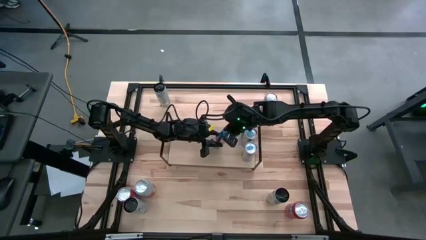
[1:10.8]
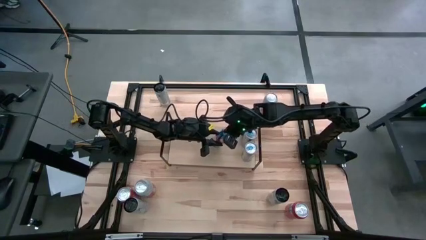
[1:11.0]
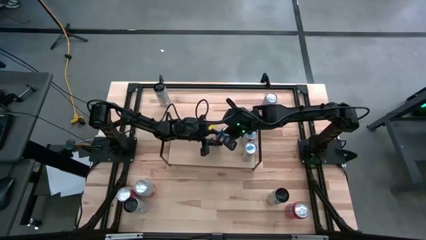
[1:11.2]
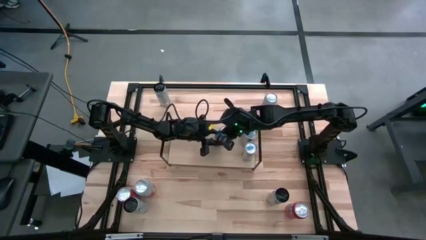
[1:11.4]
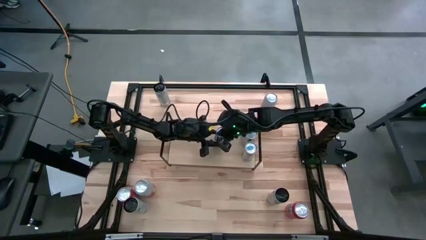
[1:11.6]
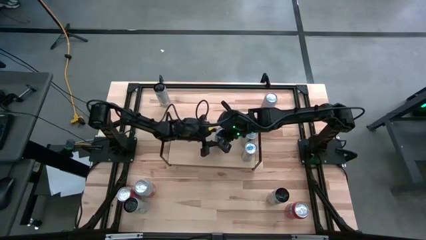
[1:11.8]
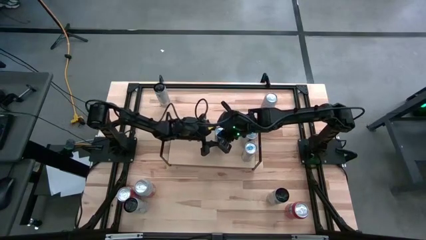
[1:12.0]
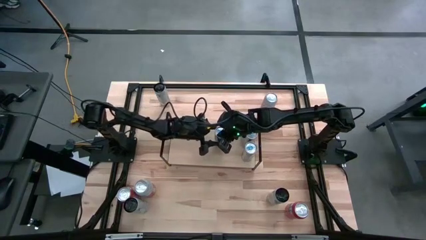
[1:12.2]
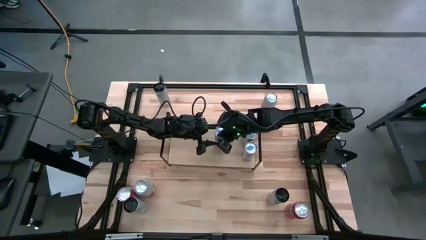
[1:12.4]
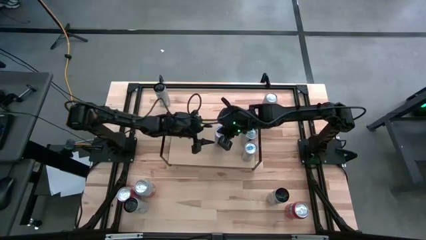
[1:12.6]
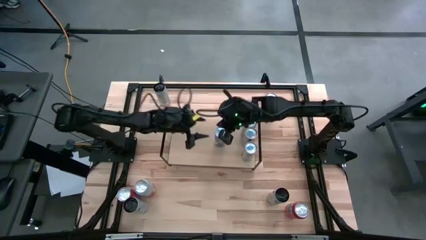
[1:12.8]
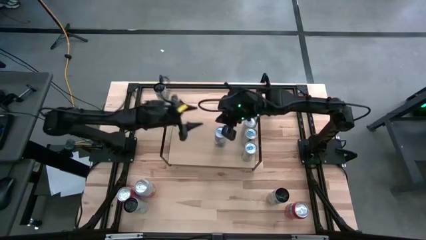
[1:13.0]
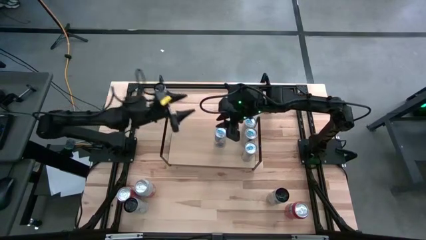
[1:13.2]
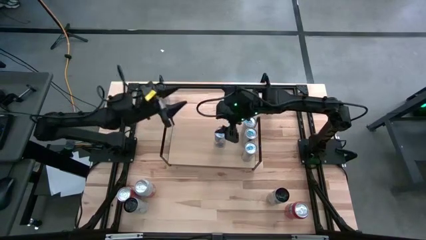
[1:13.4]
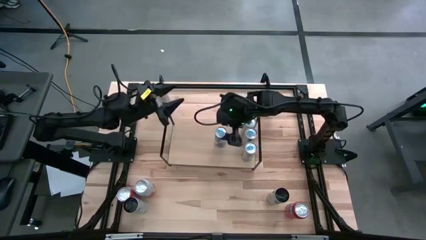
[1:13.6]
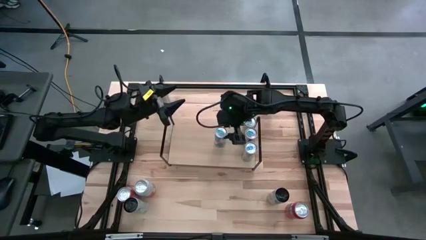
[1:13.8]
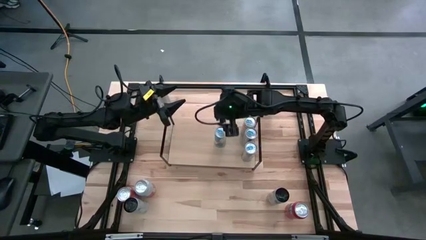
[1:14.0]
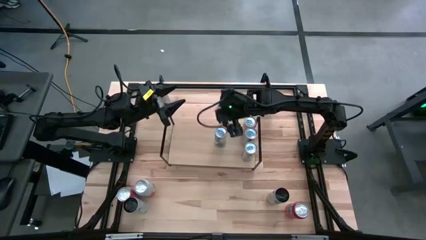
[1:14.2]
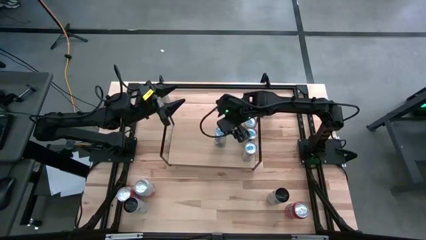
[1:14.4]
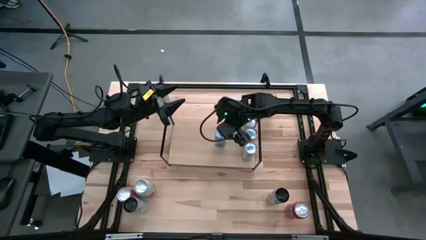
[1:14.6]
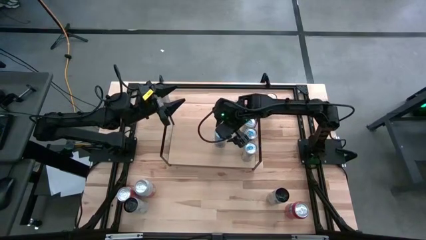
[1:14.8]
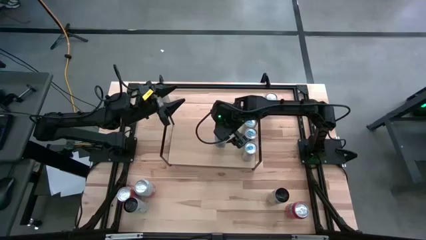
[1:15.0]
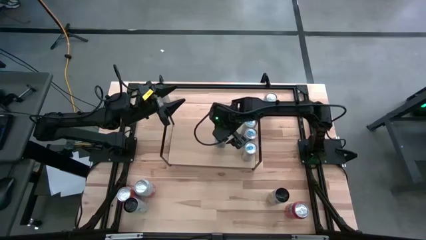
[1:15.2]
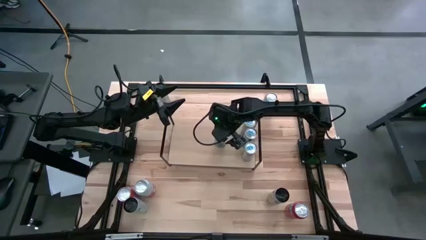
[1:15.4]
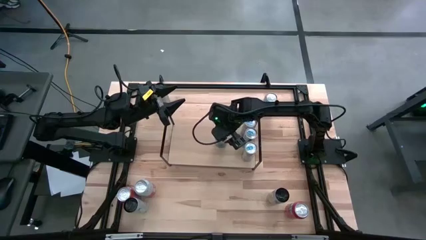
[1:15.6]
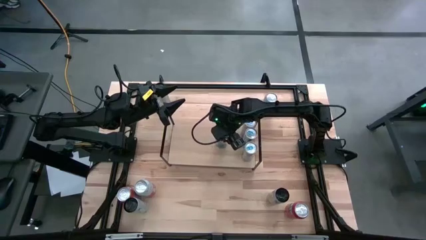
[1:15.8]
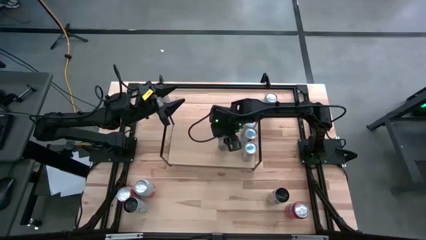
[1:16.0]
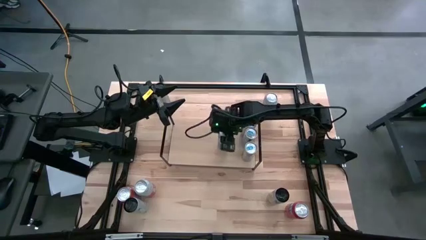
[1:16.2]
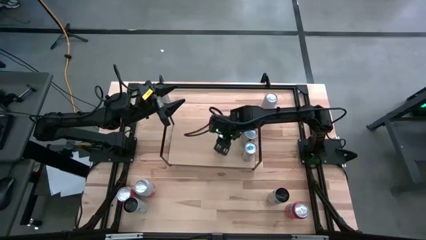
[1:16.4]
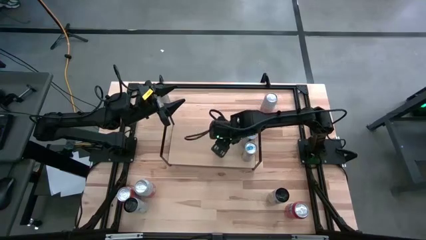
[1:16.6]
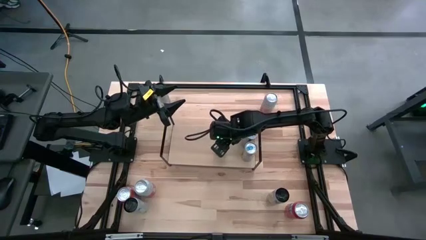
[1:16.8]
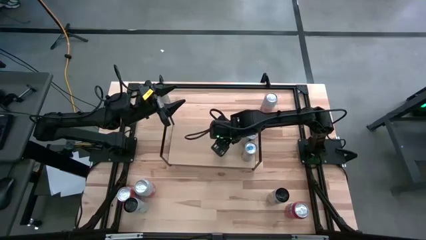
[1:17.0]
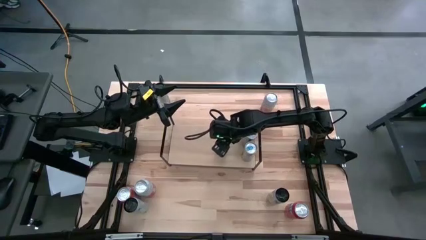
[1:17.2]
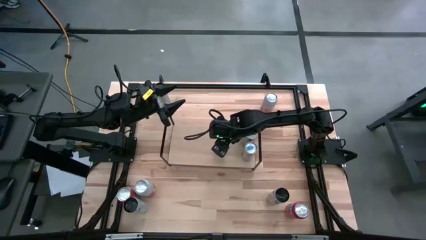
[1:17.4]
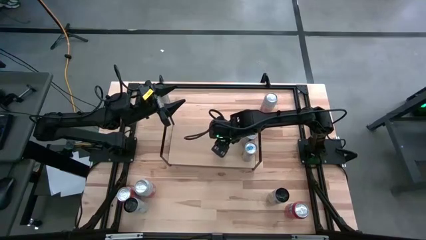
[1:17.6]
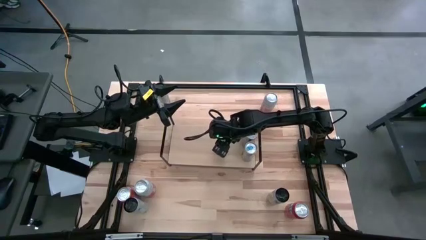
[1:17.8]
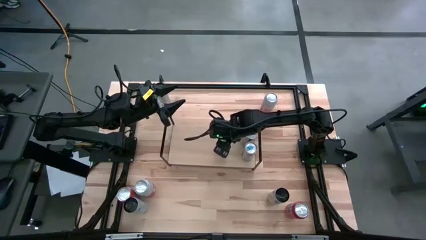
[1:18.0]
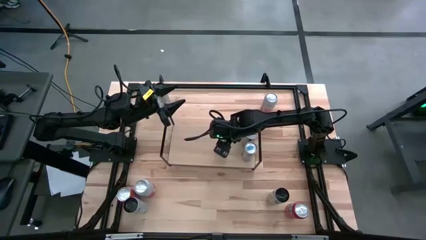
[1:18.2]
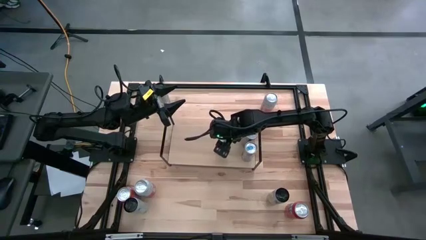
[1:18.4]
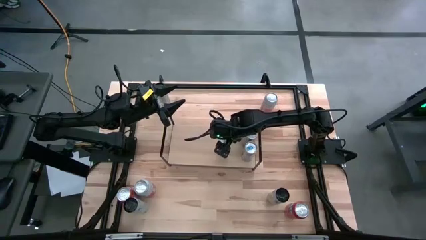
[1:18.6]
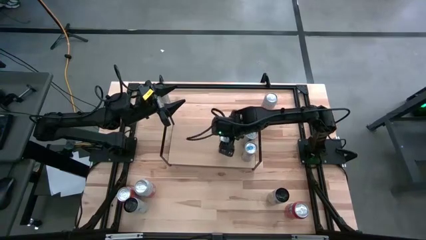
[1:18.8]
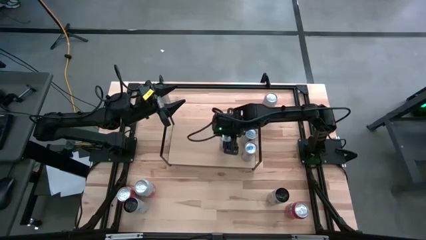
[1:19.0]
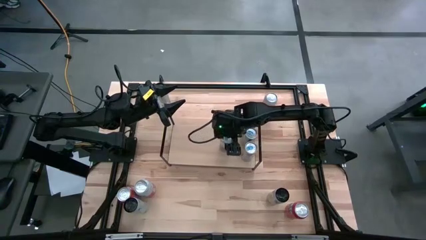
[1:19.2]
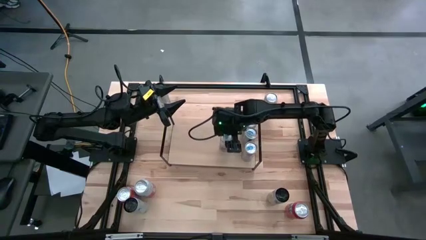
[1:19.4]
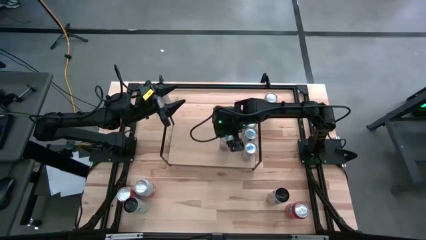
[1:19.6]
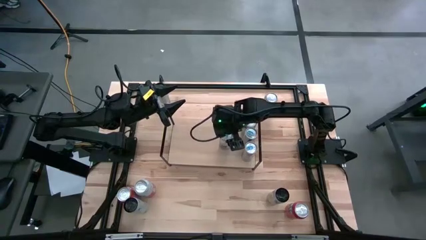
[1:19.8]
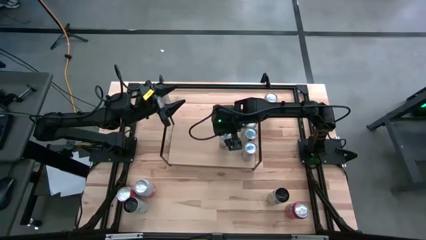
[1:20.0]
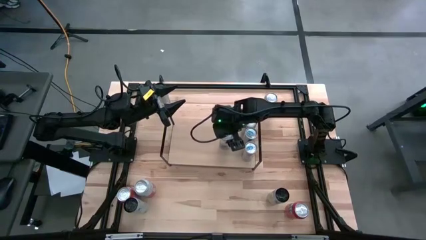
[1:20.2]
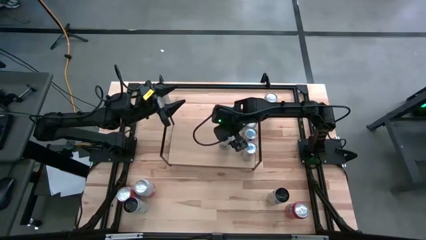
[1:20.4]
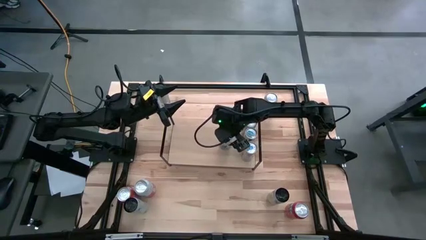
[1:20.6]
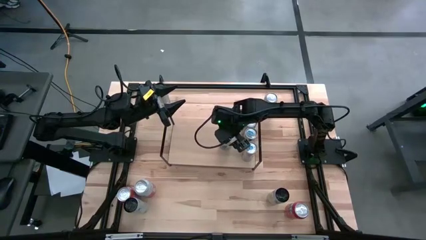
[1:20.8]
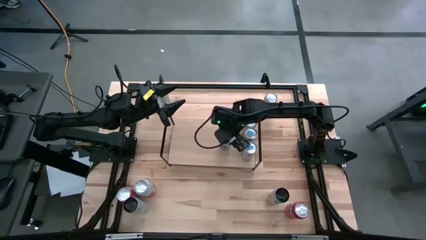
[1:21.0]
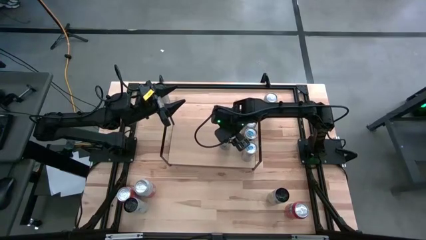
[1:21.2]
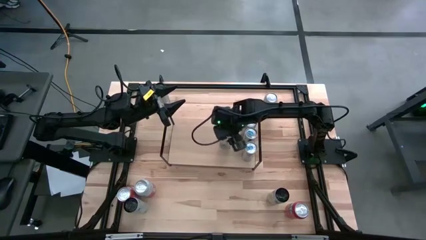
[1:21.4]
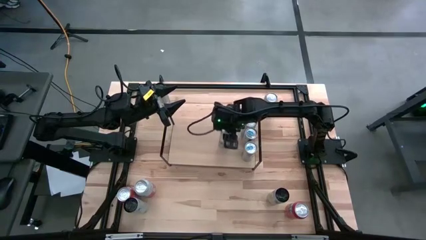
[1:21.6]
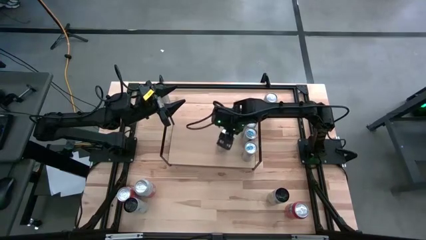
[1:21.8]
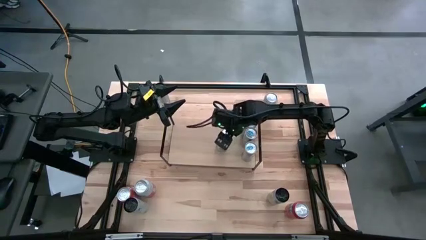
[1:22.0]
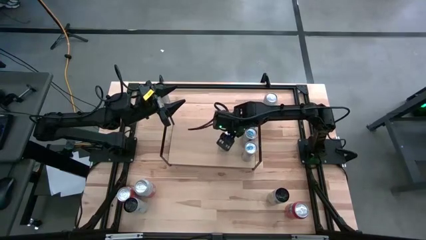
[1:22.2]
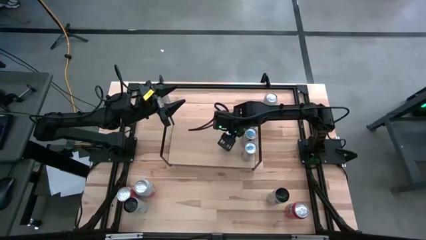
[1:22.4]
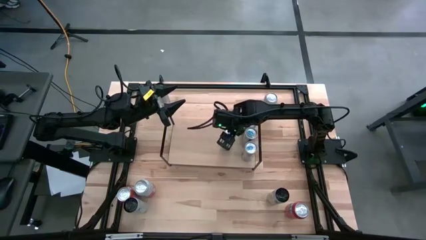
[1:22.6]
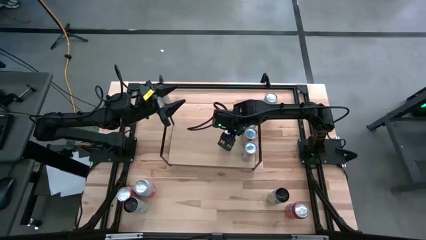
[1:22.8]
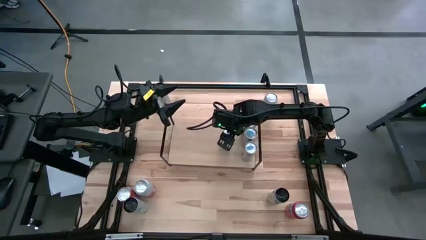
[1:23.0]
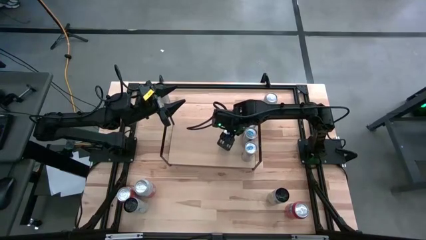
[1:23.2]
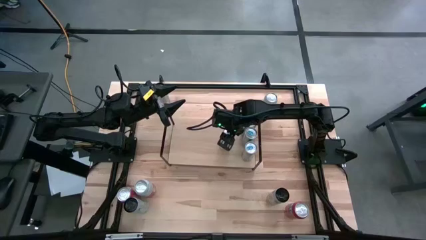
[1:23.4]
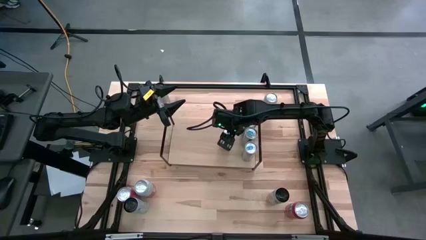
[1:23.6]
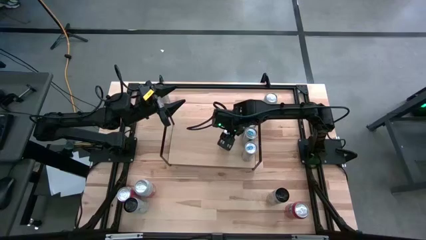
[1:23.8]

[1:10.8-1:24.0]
Task: Place canned beverage on shelf
Put the blue soda can aligned with the other blue soda can on the shelf
